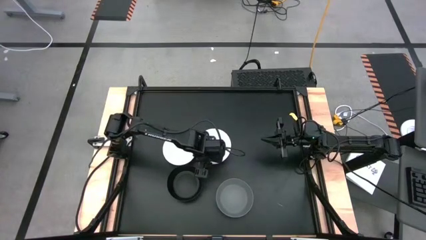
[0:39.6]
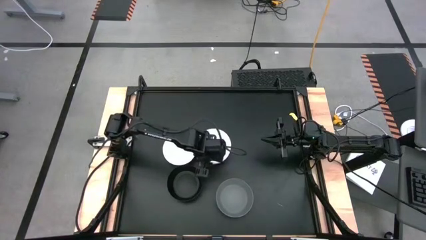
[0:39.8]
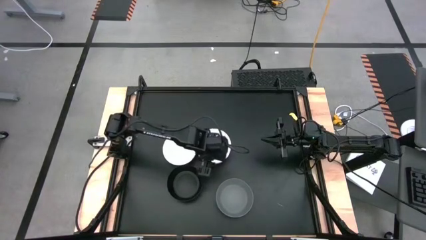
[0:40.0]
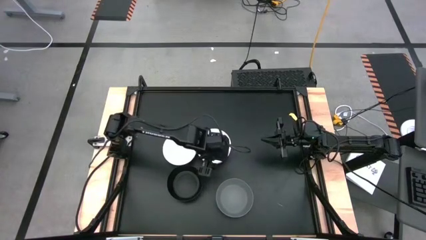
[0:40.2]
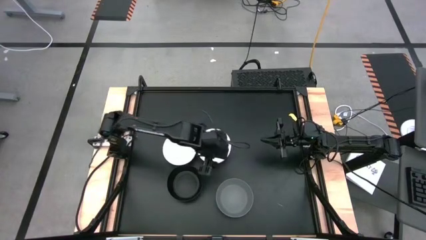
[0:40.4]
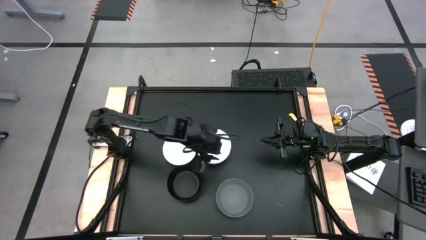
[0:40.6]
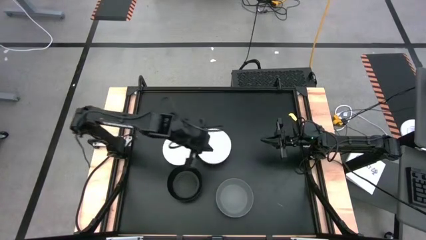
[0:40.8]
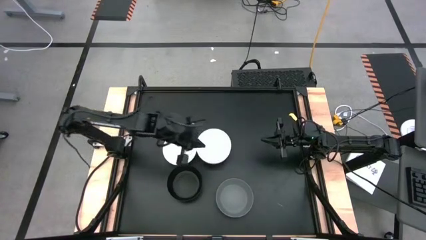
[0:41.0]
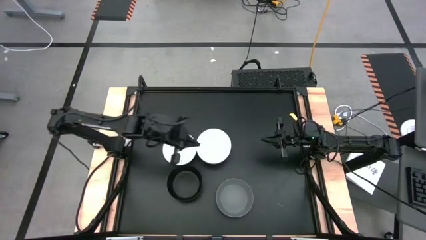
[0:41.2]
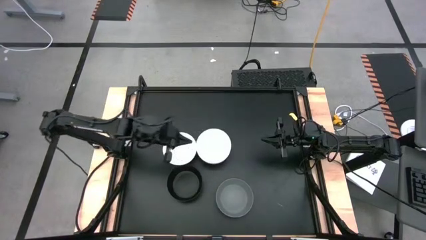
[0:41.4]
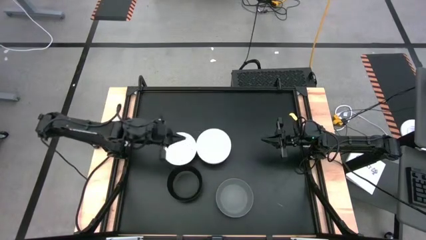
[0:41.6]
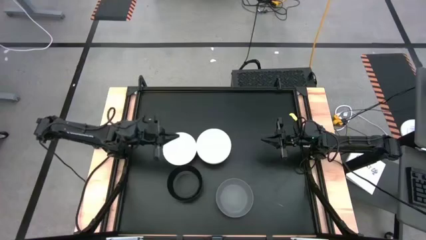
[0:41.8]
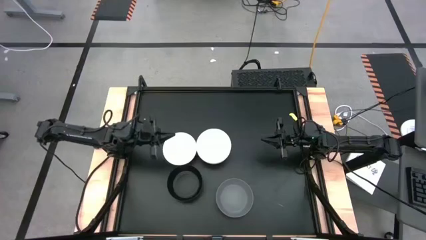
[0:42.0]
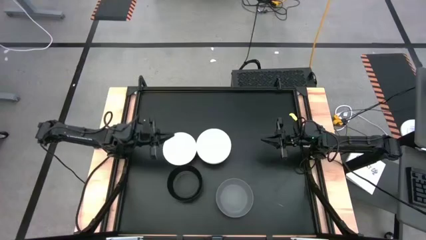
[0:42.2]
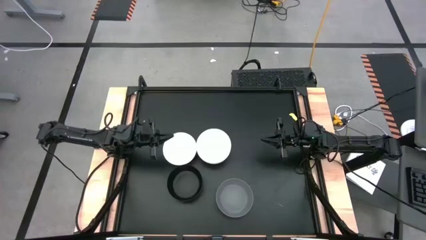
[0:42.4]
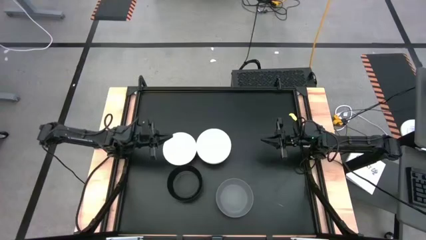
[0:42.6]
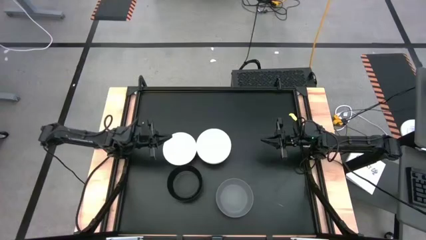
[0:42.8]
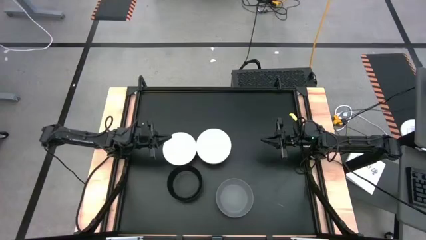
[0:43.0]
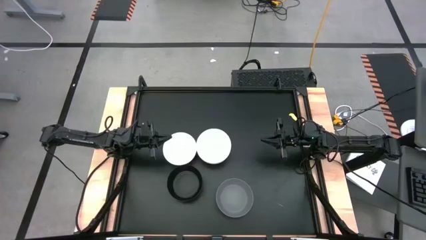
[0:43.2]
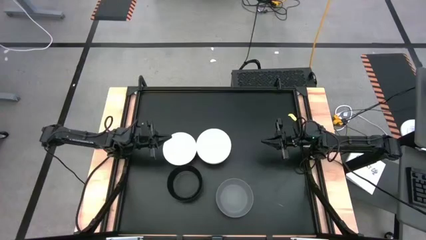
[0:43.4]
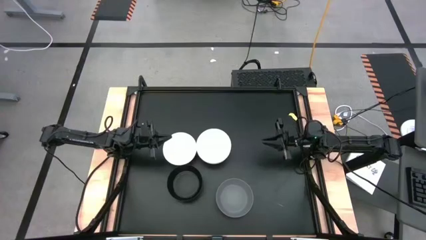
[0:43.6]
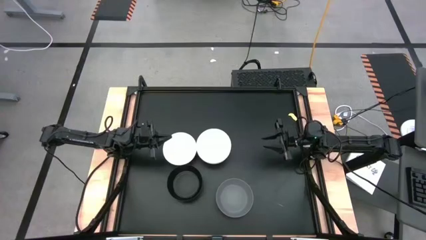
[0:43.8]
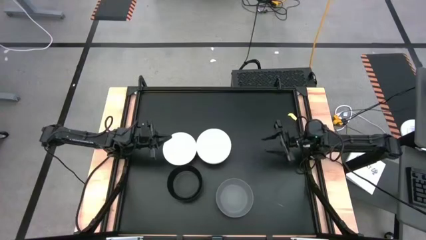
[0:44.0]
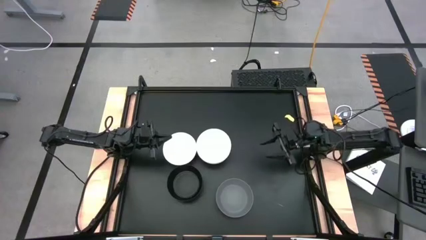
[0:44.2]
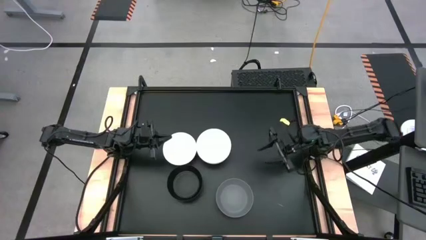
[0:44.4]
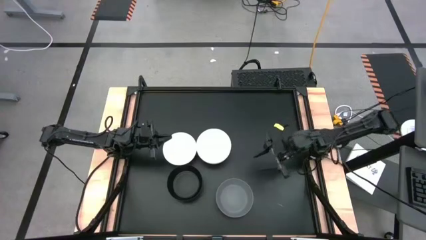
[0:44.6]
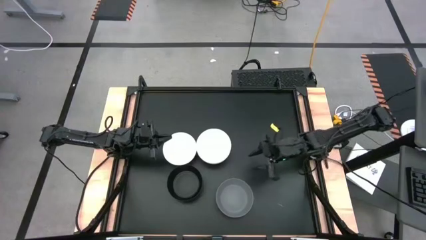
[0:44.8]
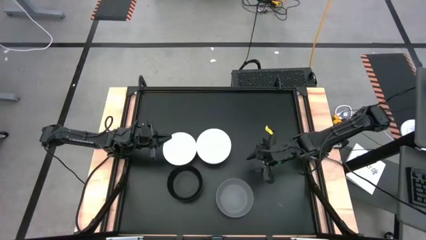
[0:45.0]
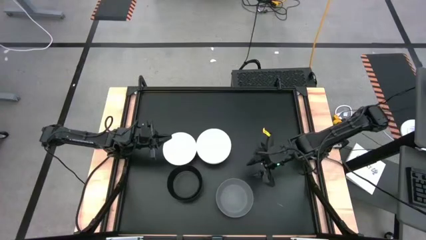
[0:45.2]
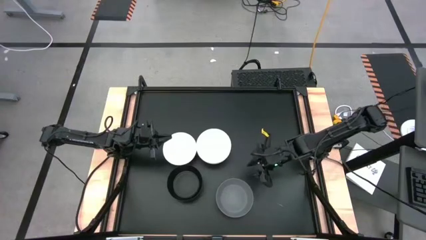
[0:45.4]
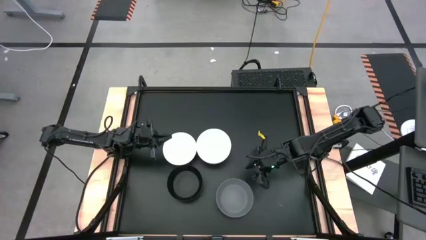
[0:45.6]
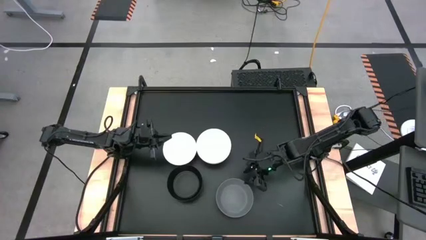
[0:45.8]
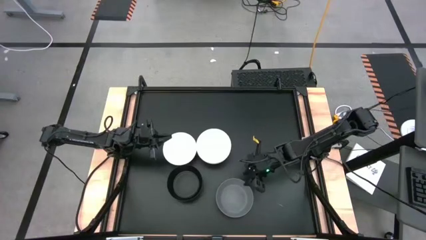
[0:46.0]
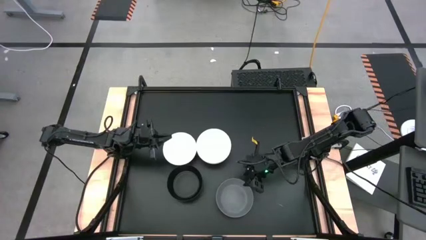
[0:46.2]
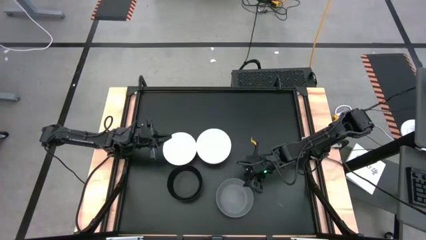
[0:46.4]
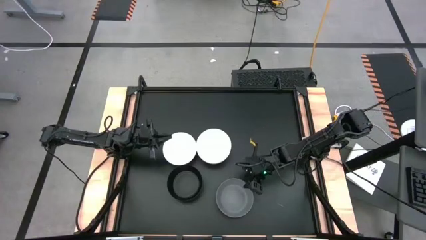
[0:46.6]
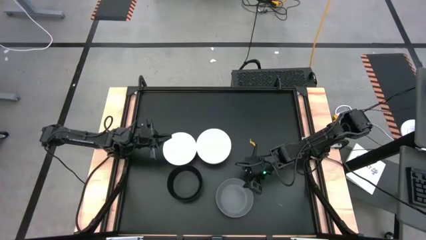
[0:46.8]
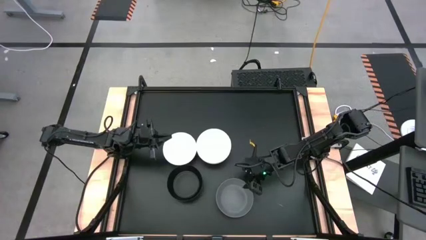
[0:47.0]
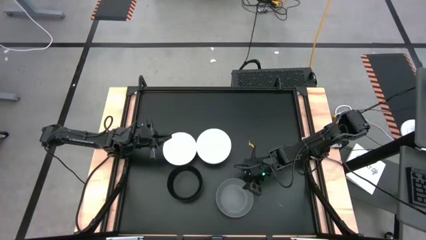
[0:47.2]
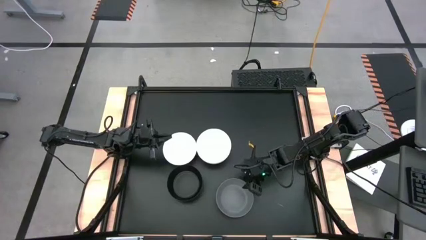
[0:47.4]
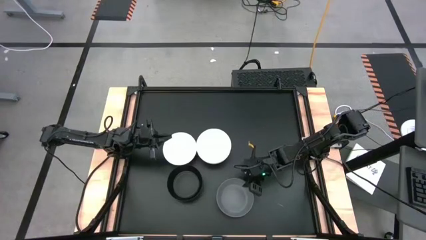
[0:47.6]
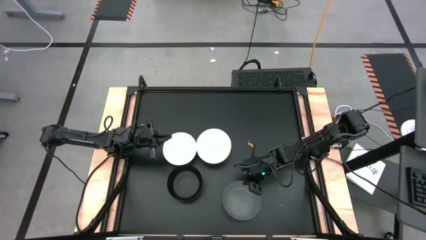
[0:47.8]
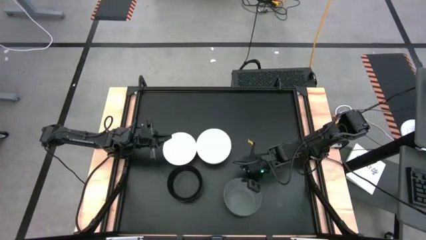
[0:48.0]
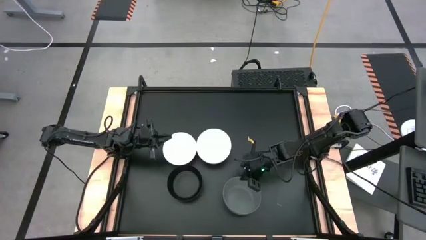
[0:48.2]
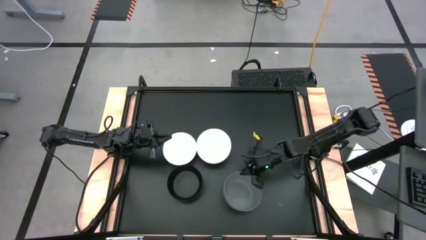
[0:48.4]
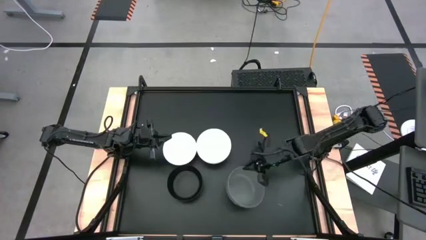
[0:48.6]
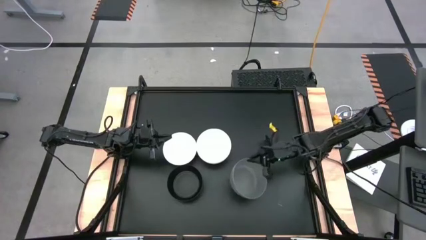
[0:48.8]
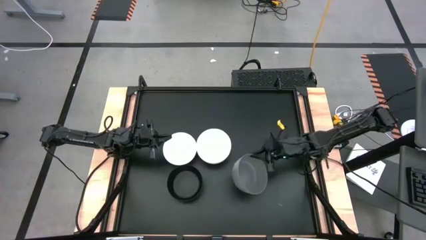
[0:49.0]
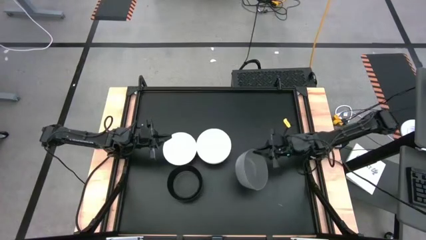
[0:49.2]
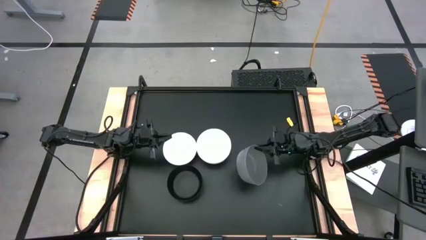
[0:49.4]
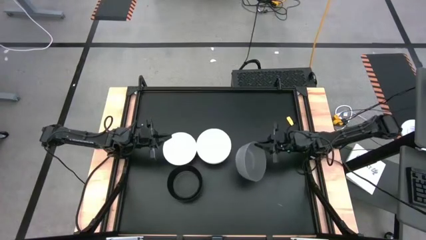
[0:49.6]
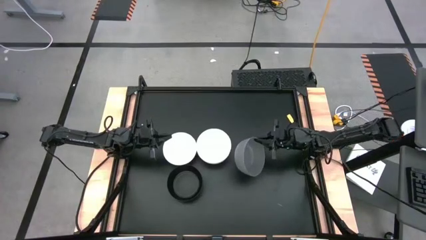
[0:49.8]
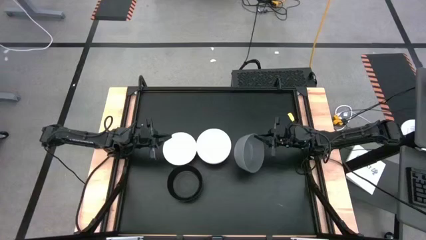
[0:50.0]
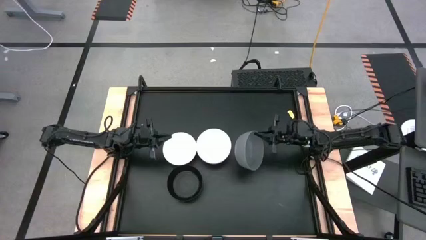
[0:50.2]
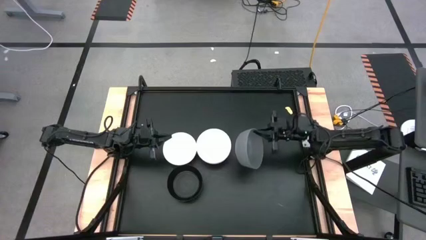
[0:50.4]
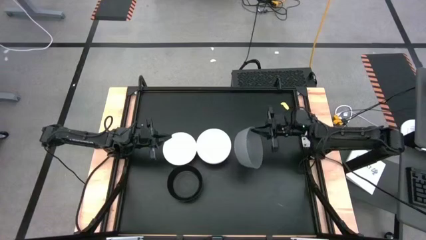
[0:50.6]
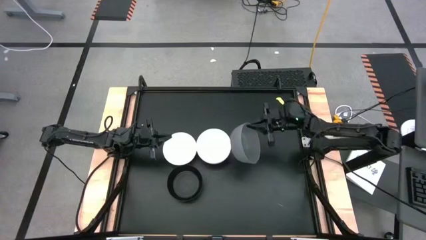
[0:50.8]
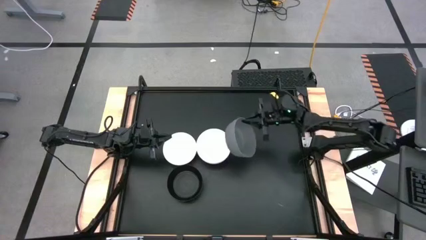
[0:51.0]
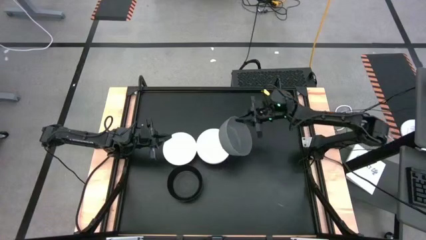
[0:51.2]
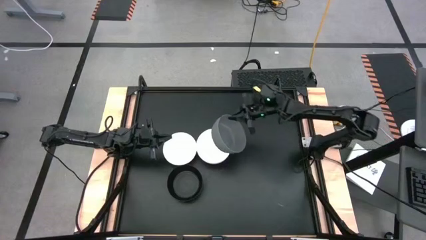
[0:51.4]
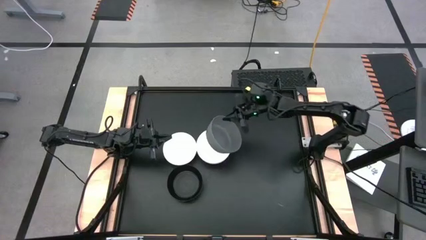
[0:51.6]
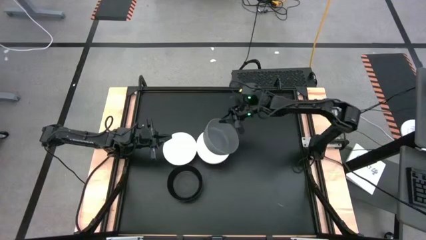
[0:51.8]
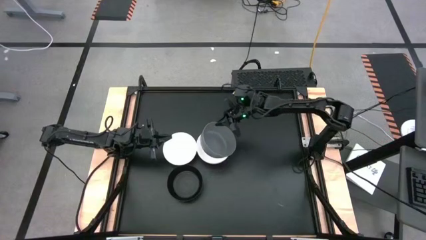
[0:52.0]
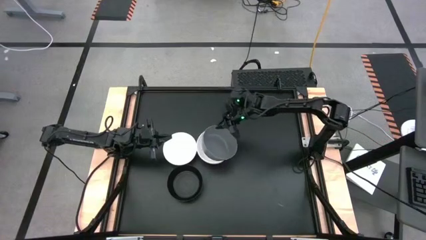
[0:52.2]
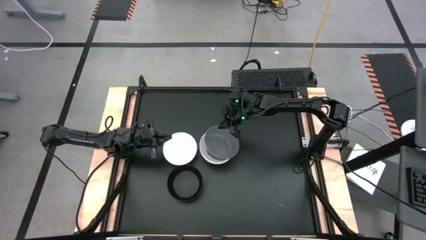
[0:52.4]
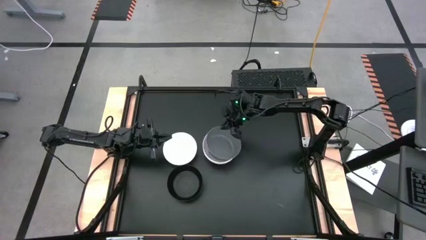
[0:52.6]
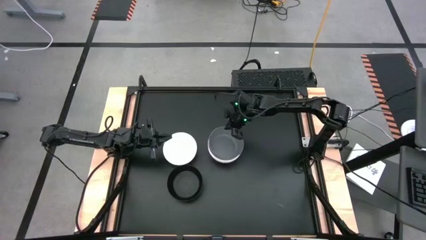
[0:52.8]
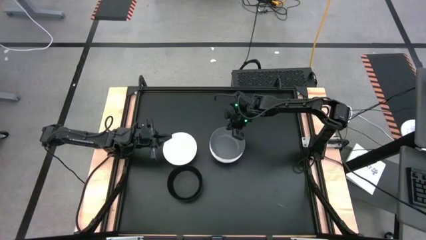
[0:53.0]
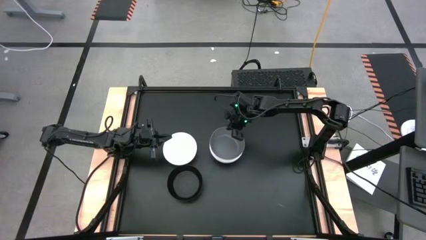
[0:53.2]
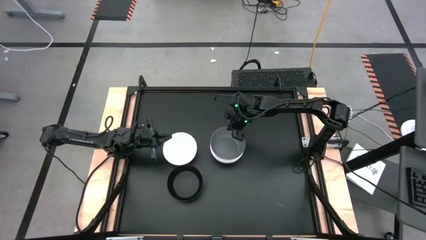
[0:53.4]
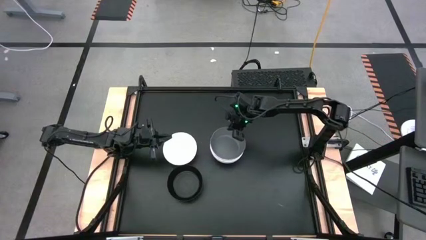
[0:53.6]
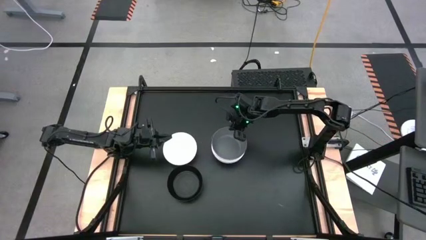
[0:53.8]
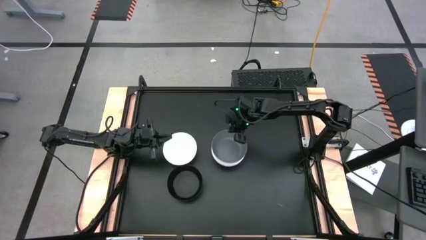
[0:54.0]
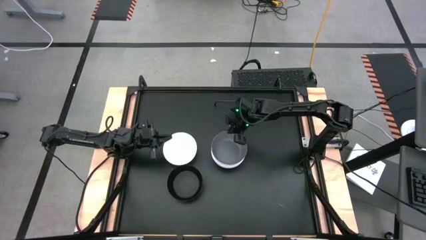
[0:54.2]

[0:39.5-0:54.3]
Task: Nest bowls inside each other
Stack the gray bowl into the white bowl
